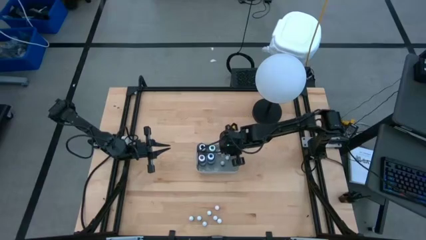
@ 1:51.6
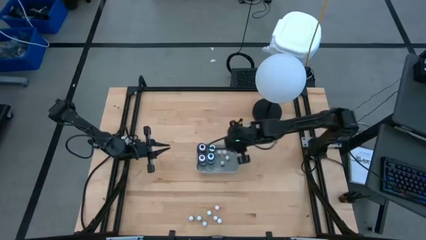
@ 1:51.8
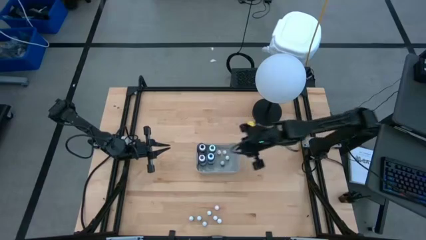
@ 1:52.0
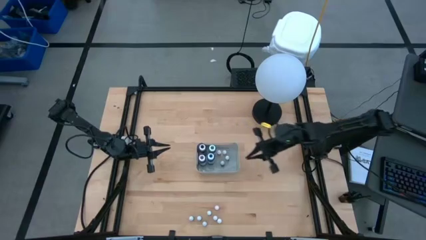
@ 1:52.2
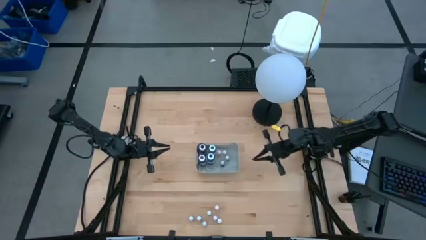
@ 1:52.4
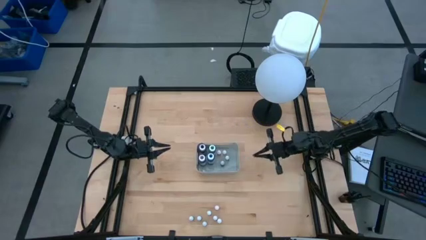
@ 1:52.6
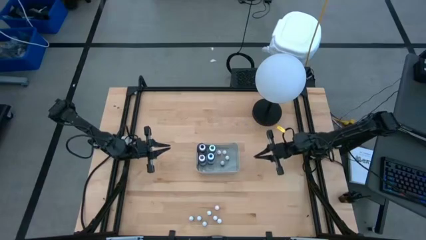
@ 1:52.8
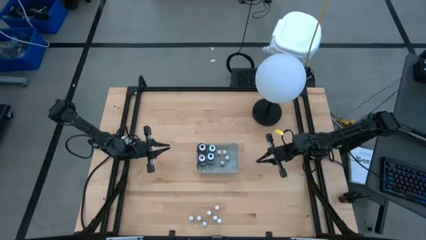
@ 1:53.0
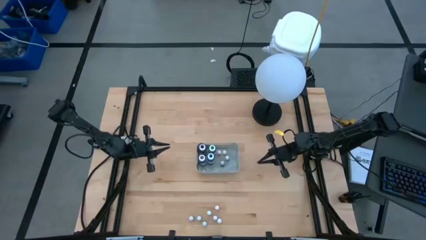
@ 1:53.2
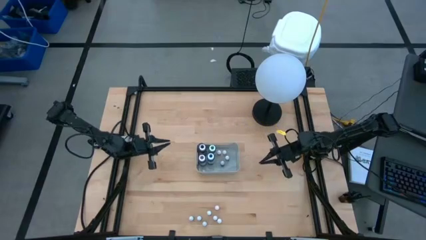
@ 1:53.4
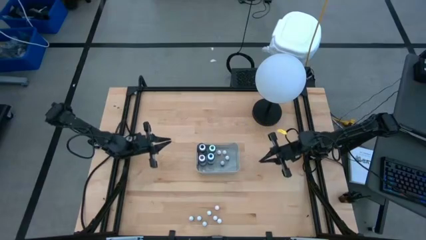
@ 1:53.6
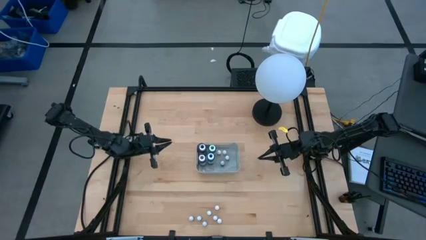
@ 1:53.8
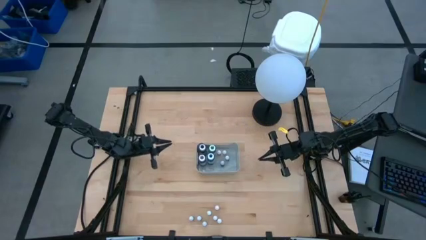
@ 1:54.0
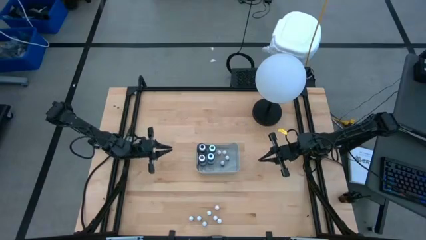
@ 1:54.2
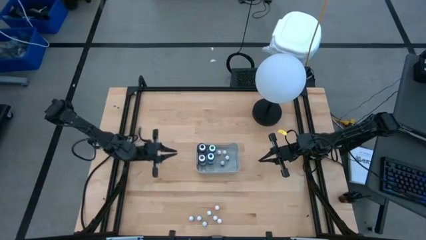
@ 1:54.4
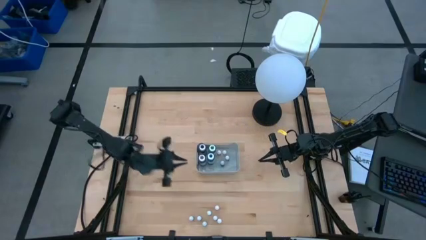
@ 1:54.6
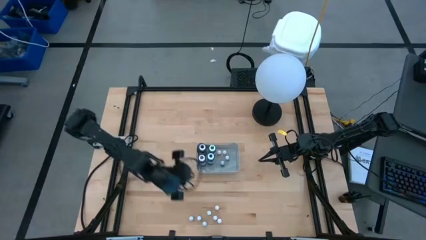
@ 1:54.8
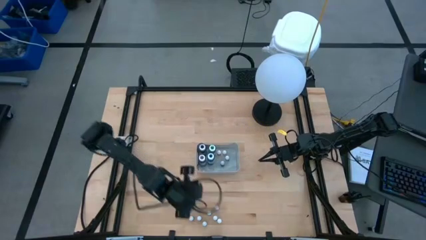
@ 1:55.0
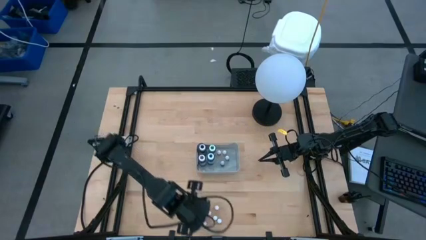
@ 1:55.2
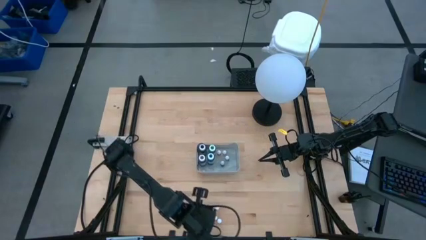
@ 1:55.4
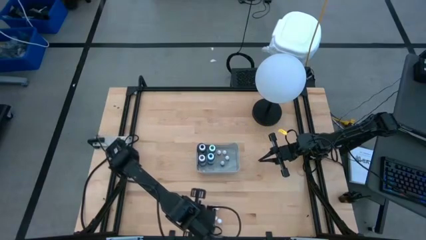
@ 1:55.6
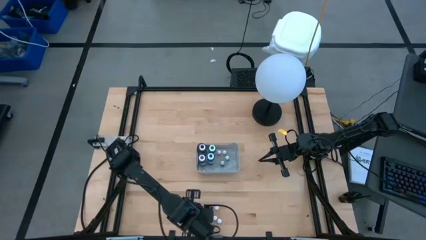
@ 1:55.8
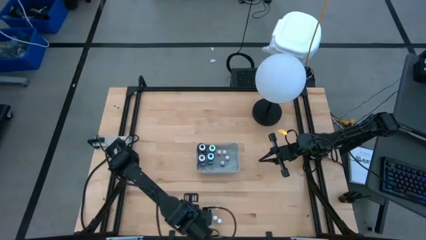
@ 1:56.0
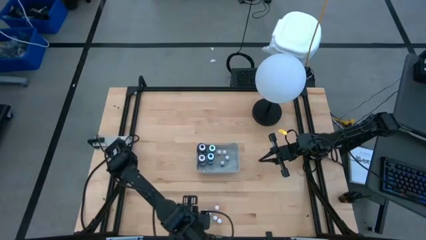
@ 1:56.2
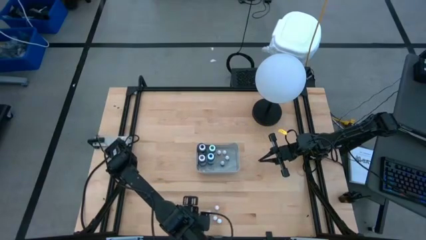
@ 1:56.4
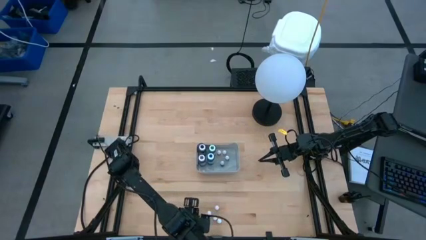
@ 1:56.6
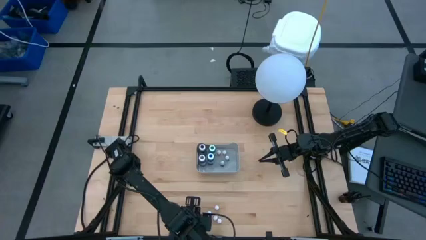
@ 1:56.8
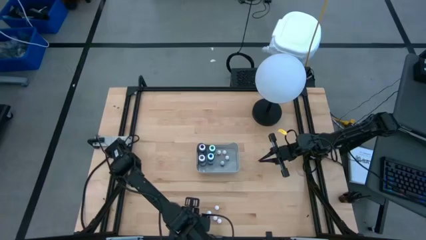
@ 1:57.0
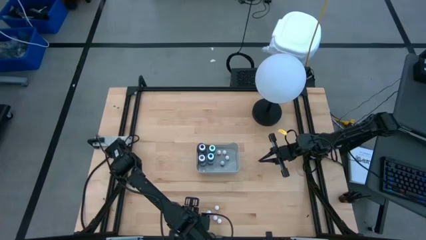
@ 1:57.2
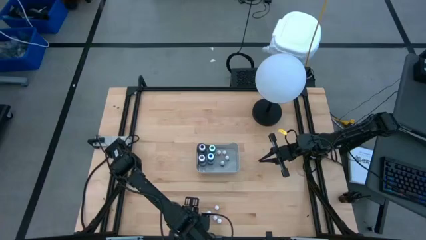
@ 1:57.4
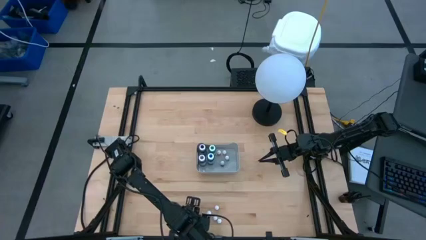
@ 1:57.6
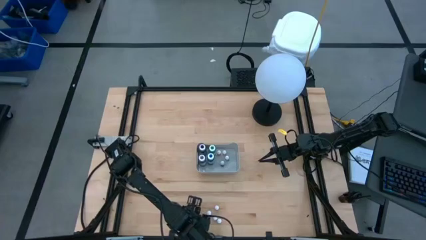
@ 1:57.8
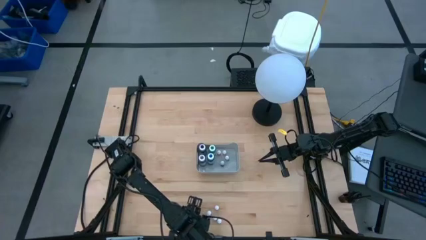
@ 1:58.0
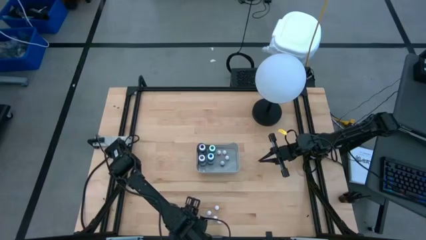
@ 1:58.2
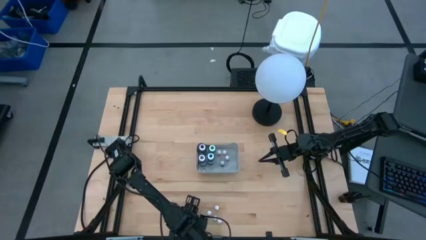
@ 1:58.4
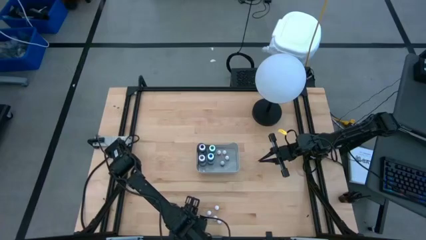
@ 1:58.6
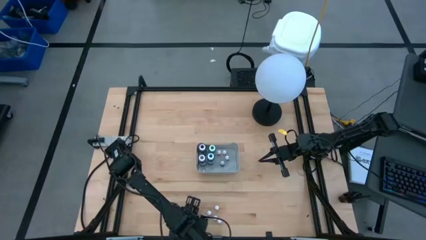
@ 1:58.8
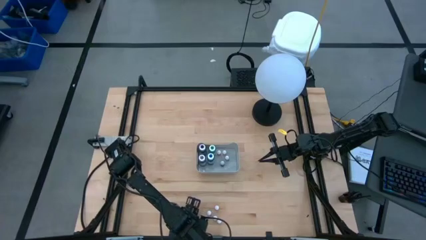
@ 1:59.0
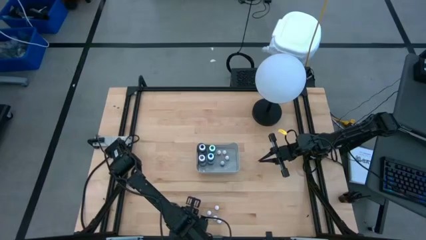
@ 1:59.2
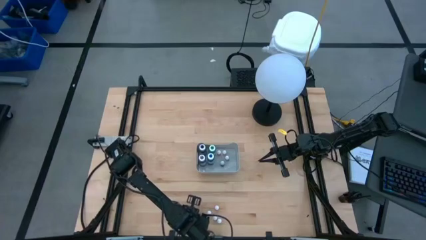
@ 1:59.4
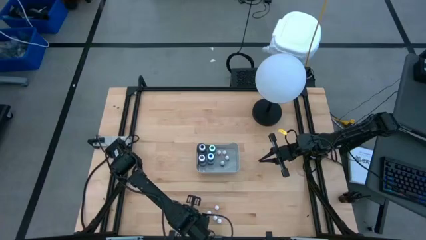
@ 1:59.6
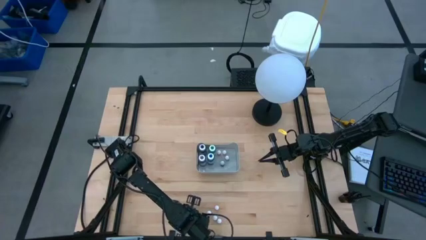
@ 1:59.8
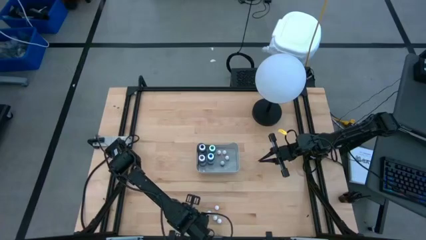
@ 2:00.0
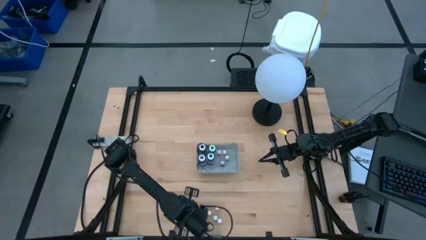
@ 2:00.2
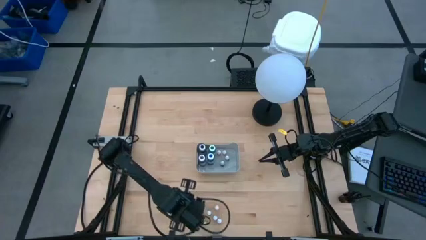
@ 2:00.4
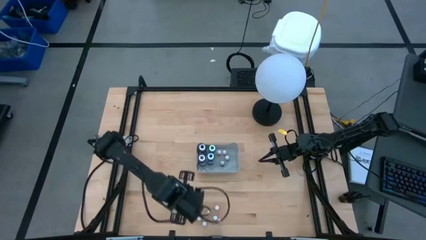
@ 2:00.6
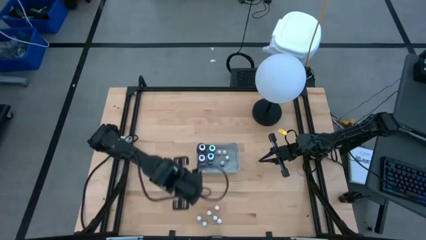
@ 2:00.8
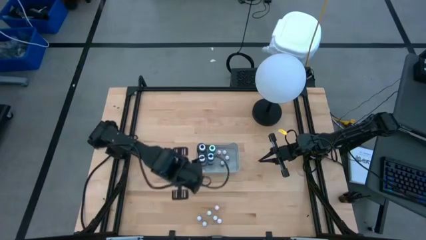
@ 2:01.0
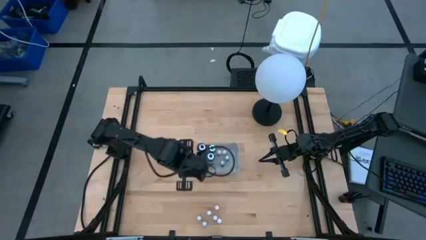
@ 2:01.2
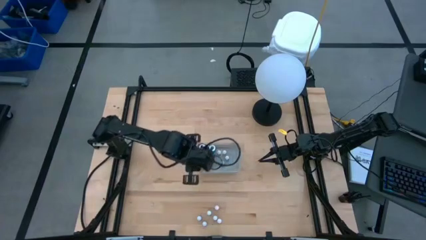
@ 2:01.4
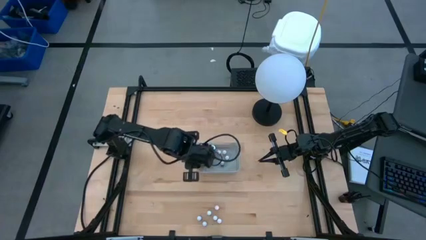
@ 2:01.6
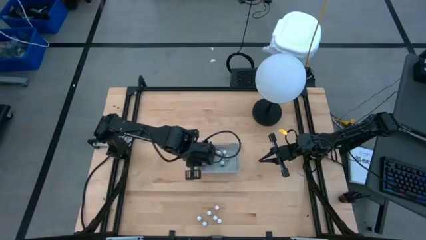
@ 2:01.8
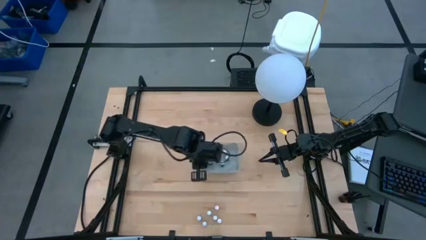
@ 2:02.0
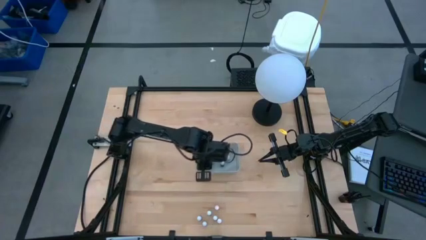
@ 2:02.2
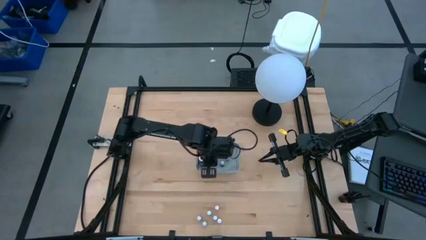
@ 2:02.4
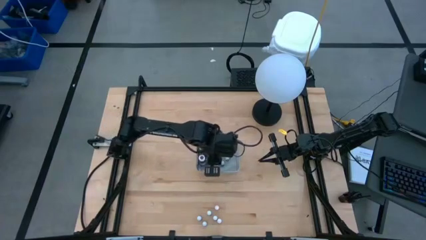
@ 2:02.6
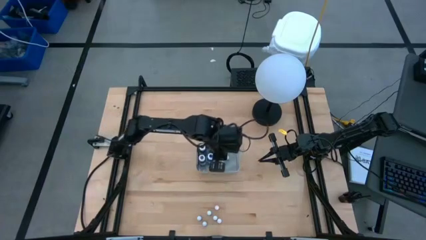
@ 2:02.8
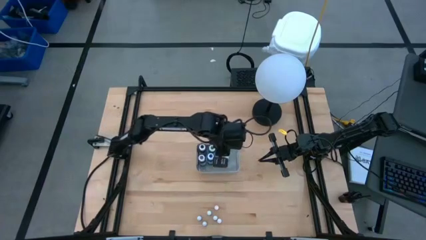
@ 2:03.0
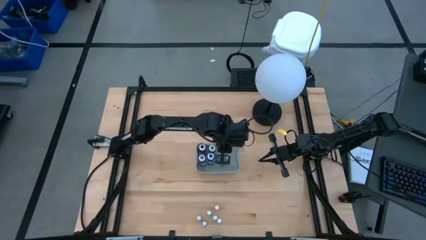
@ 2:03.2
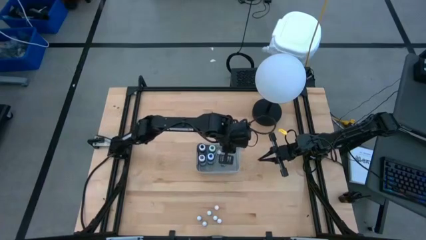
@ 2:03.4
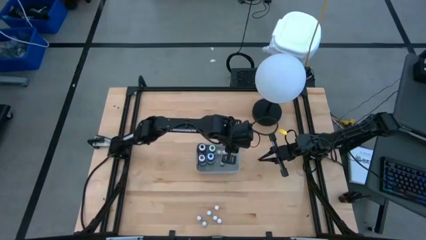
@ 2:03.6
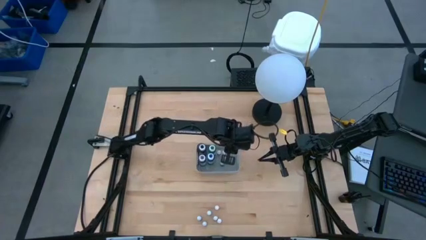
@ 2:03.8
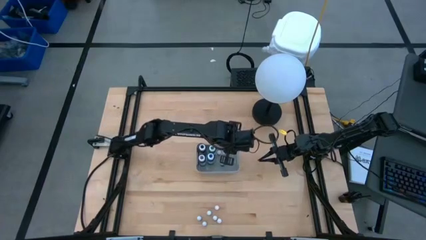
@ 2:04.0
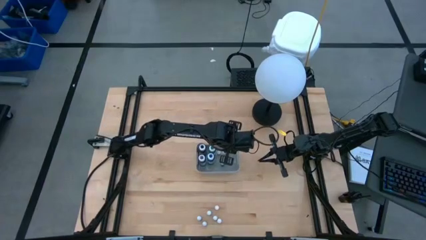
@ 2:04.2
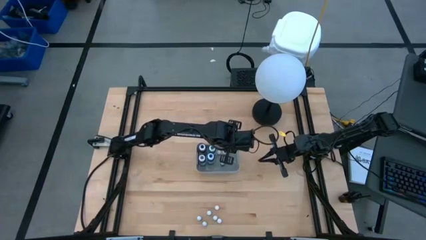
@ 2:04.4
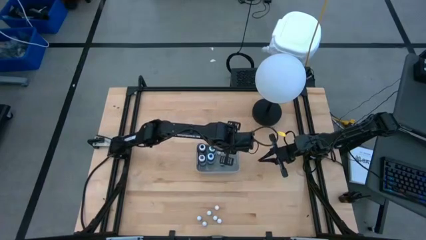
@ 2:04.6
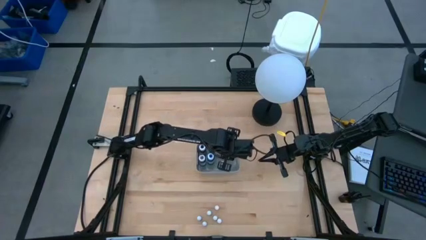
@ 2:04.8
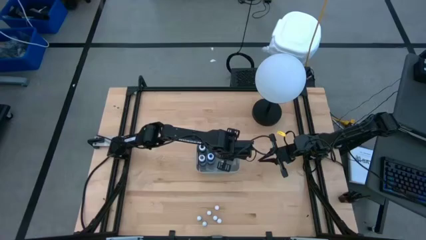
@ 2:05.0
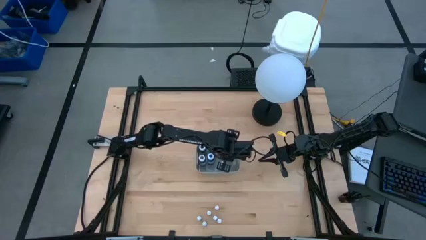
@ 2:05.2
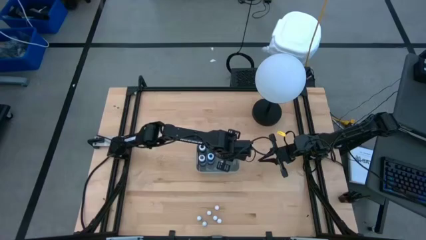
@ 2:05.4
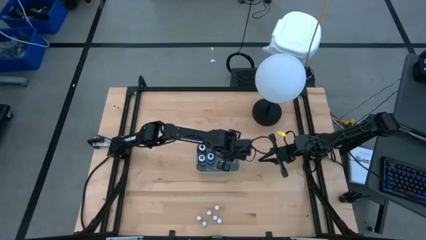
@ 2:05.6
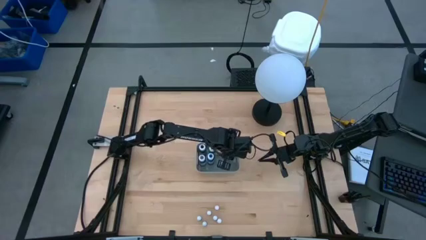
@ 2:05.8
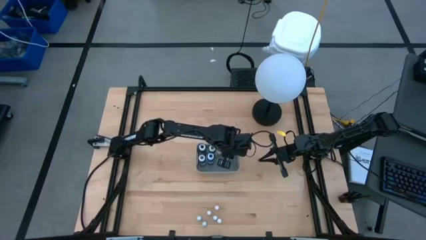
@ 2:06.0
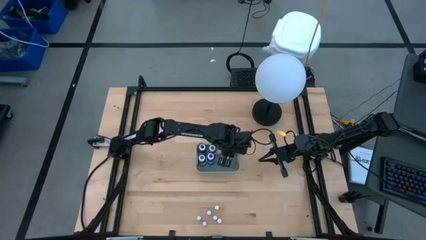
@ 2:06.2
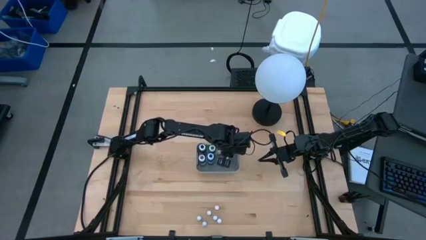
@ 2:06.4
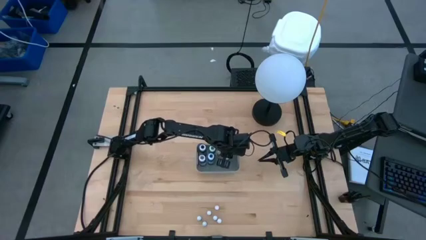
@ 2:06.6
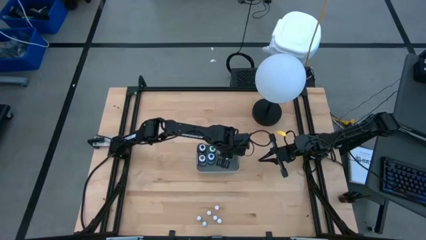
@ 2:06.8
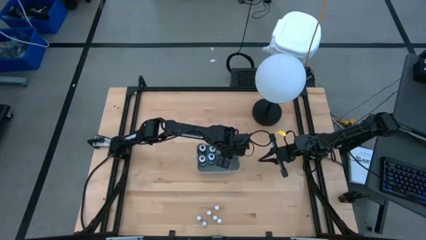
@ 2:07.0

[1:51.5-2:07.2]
Task: Pick & Place food coloring
Put the small blue food coloring bottle into the gray bin
